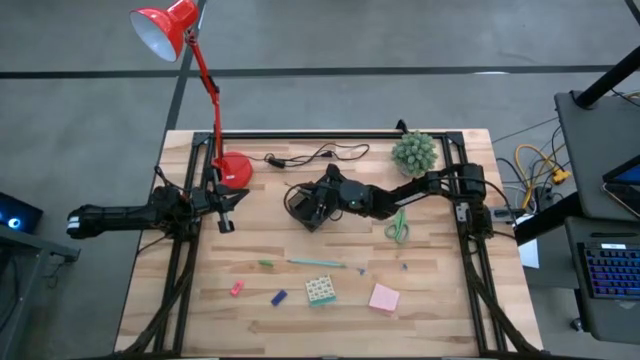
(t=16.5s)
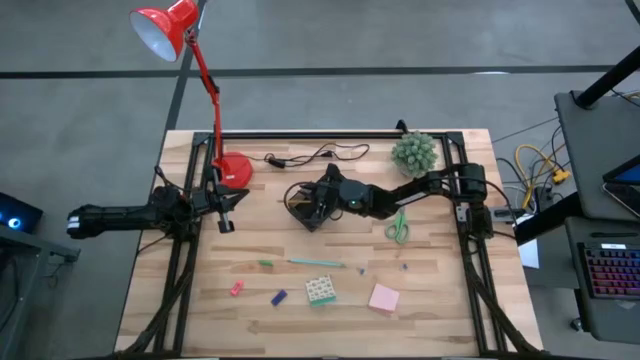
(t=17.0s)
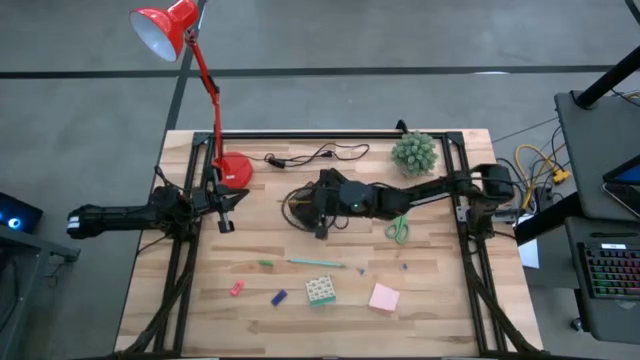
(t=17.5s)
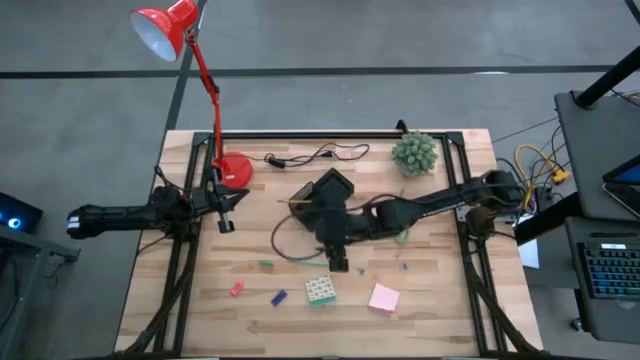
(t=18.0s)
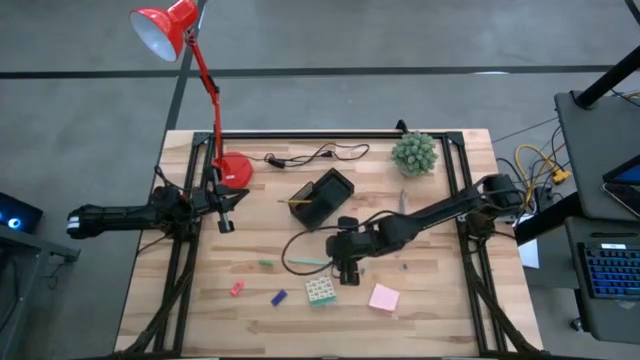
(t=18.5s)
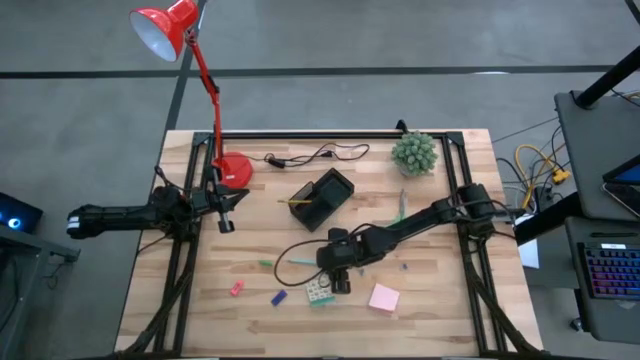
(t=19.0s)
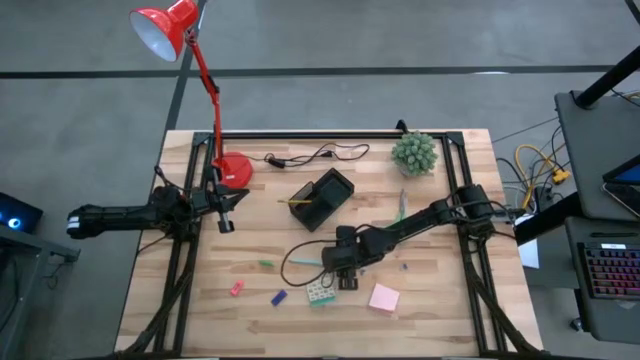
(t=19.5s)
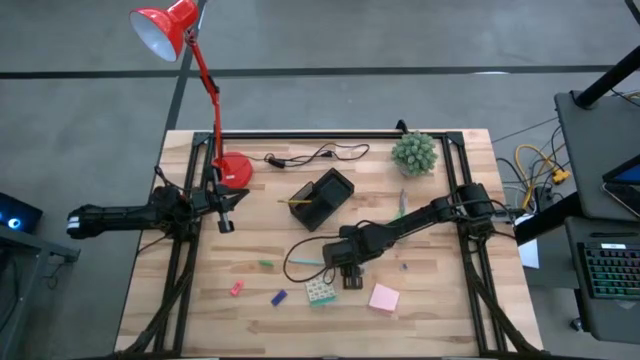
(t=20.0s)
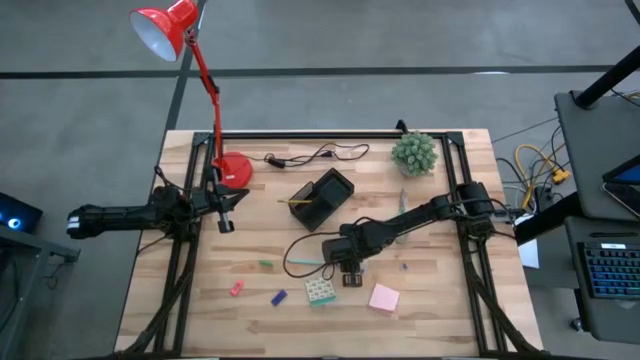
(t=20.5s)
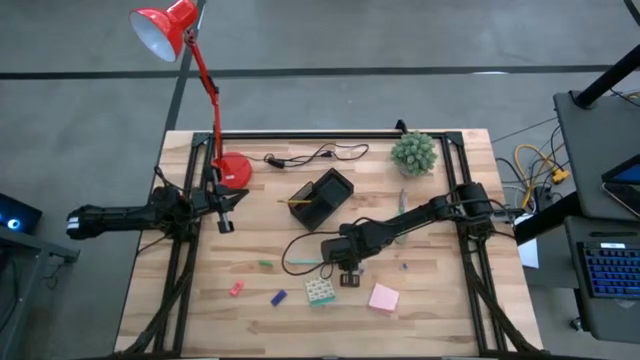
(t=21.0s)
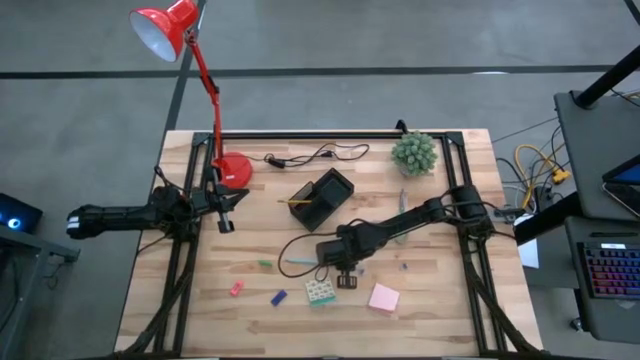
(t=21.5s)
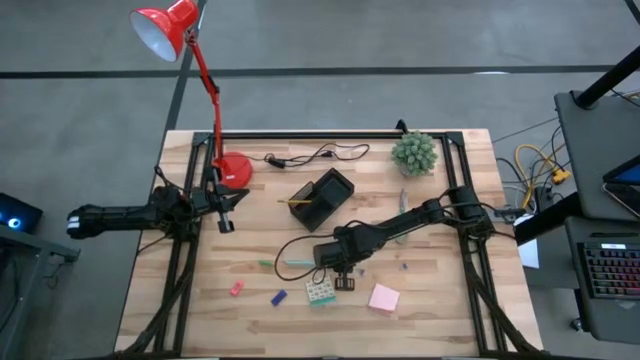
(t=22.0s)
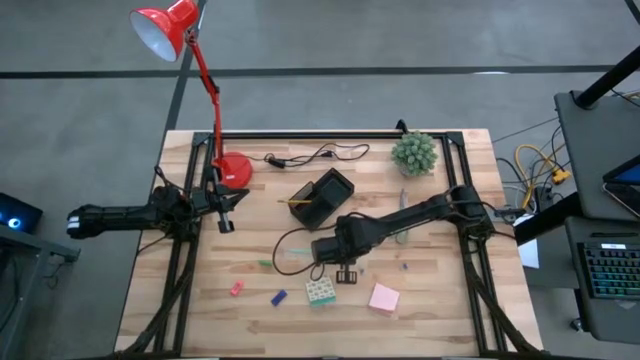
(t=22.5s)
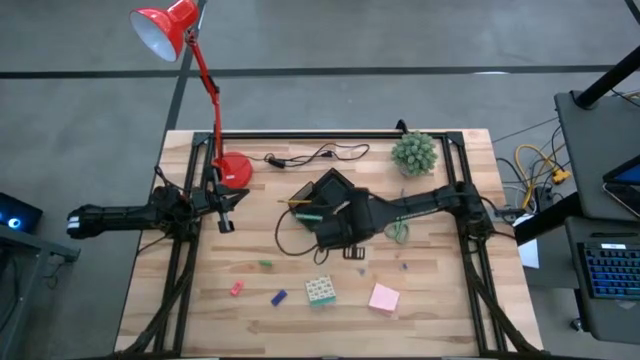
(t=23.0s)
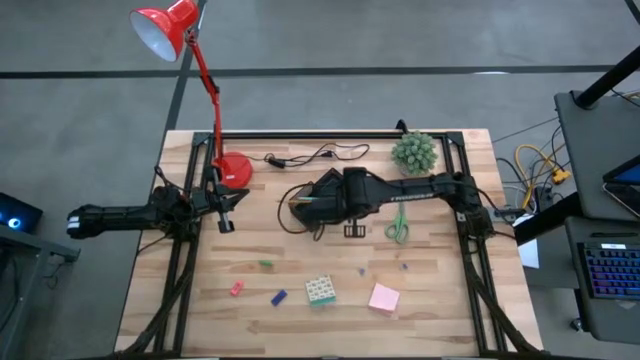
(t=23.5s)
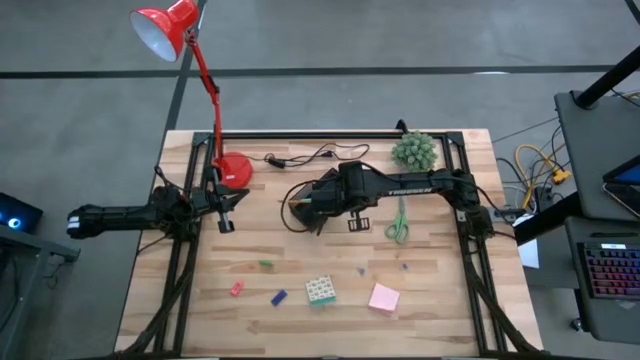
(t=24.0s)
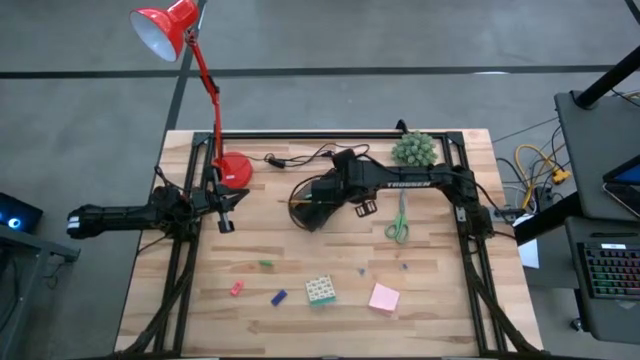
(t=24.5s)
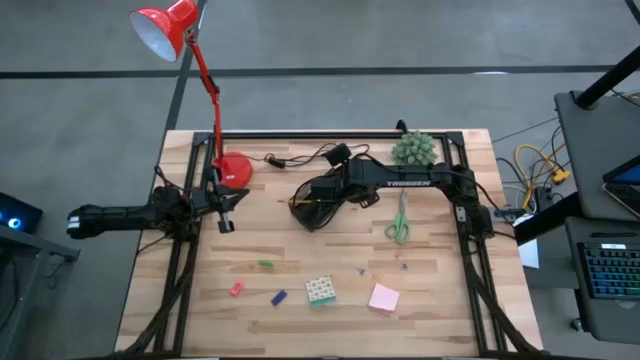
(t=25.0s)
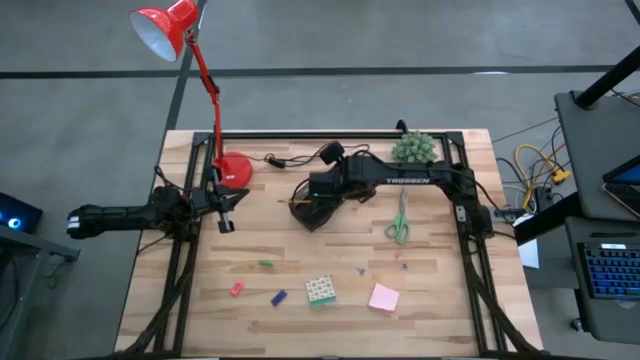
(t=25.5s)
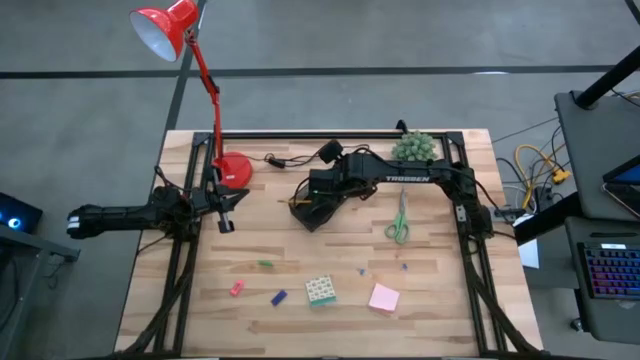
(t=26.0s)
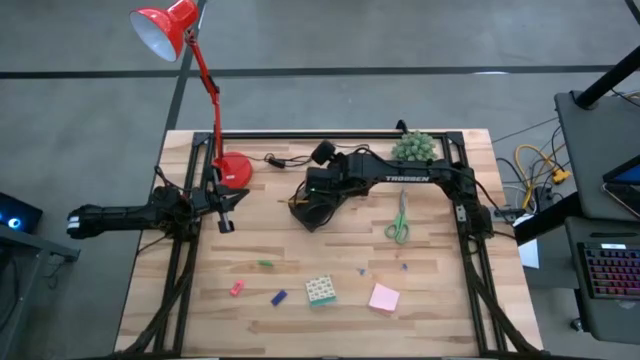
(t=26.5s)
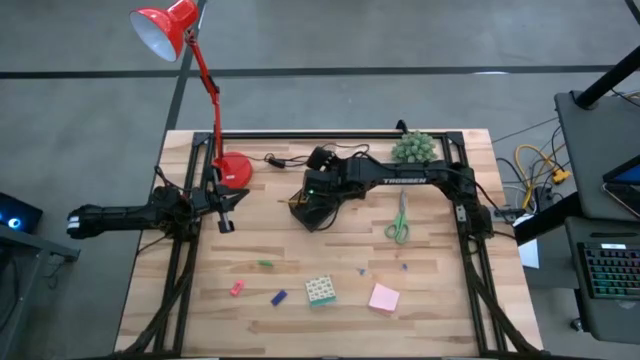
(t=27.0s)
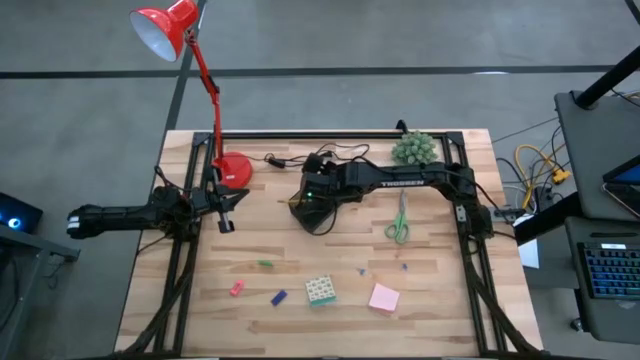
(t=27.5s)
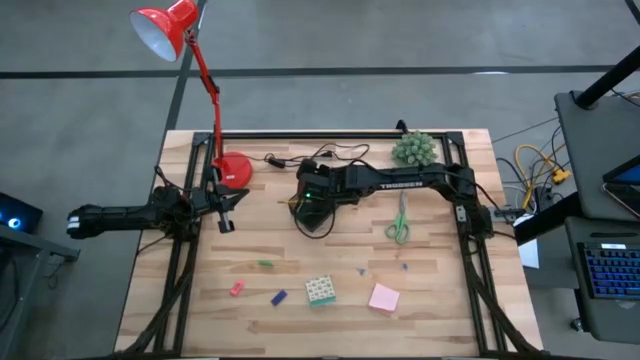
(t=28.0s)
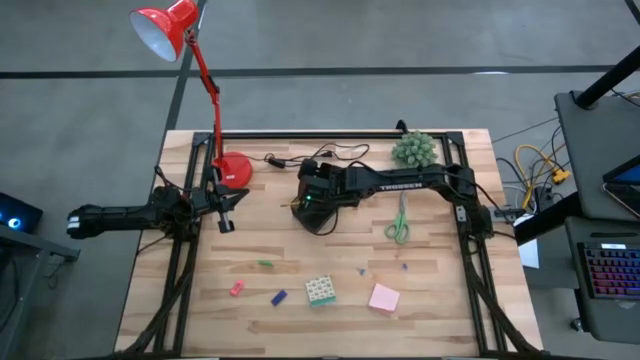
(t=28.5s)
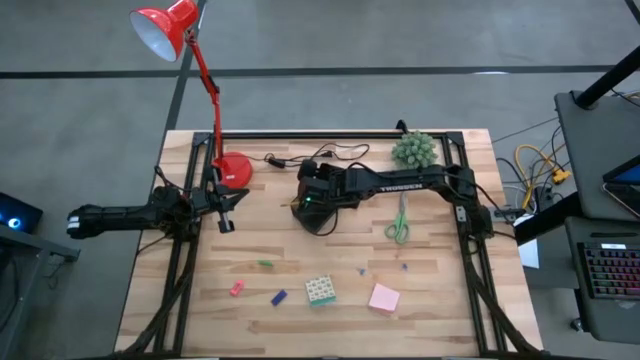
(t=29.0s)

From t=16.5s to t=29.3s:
Task: Pick and place office supplies into organizer
Put the blue pencil into the black desk organizer

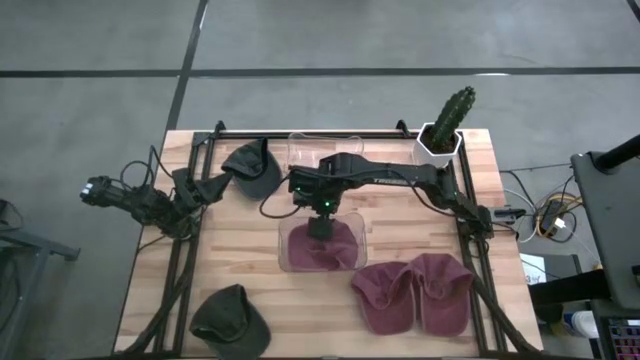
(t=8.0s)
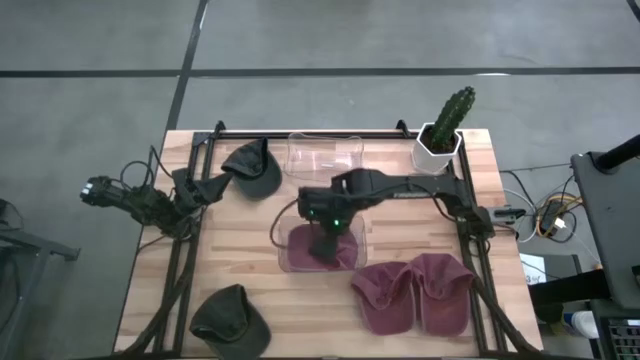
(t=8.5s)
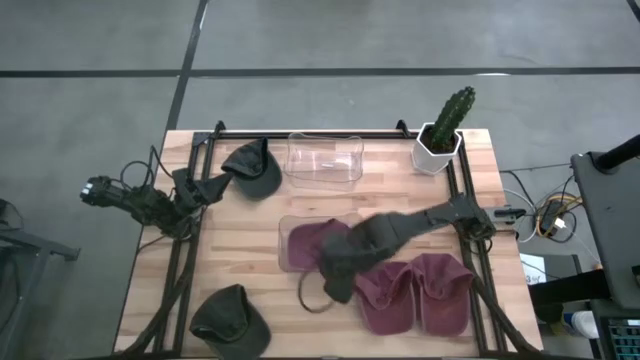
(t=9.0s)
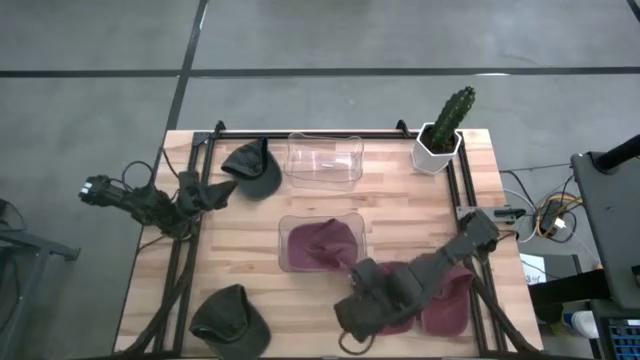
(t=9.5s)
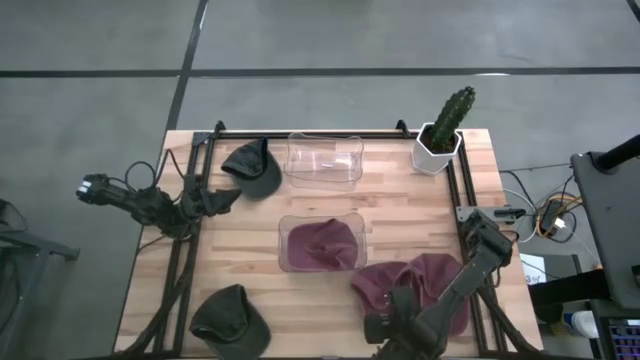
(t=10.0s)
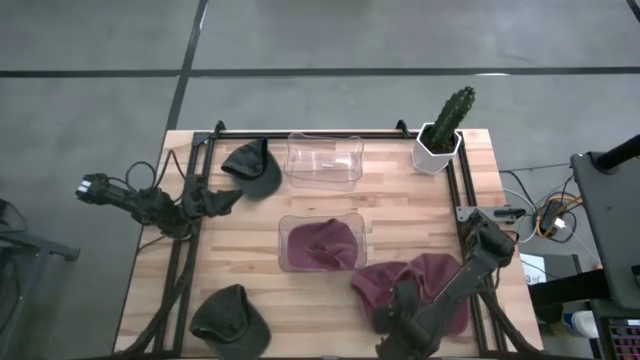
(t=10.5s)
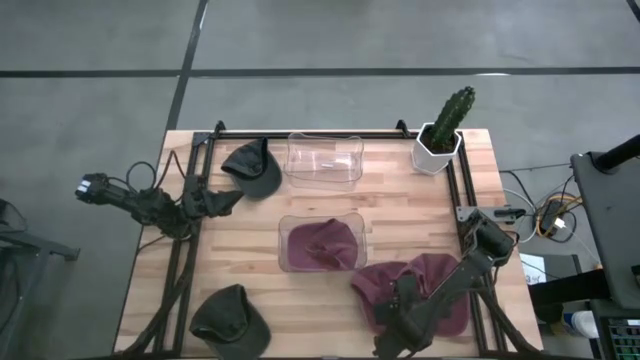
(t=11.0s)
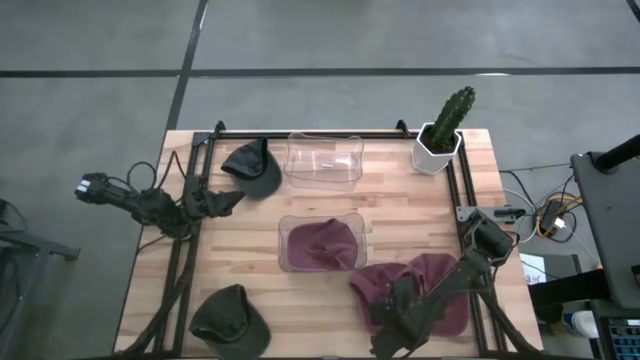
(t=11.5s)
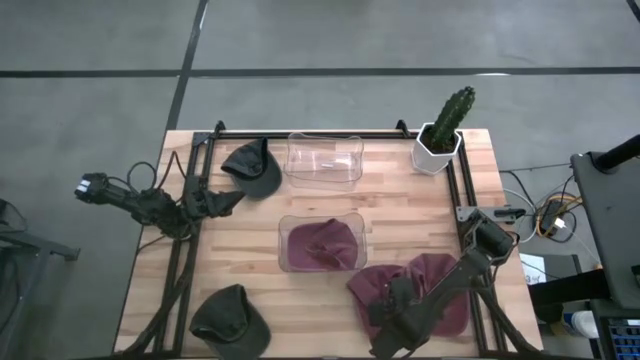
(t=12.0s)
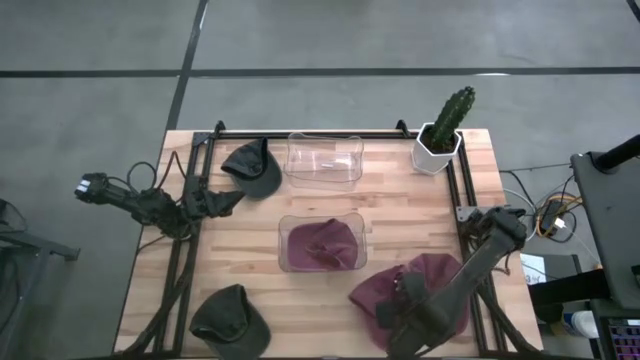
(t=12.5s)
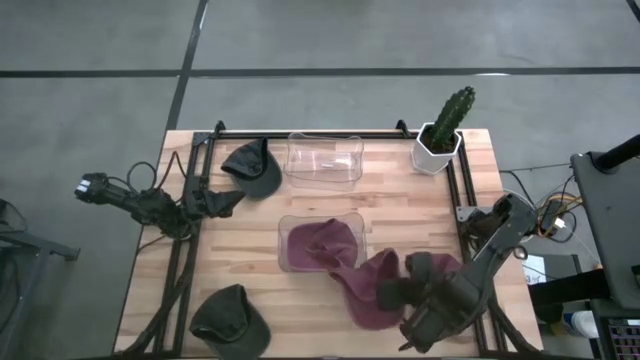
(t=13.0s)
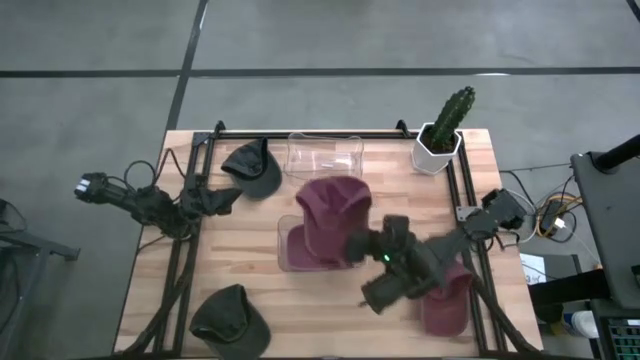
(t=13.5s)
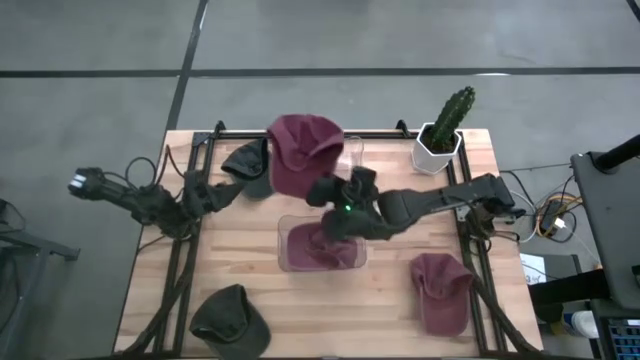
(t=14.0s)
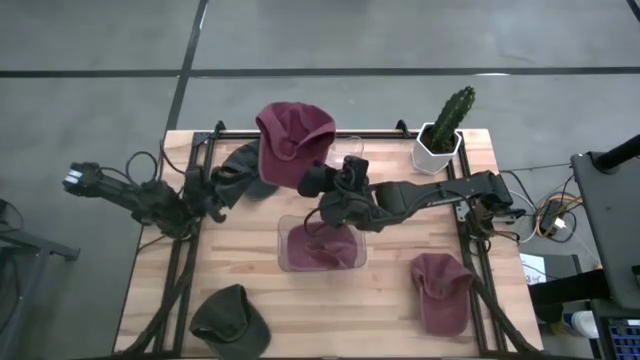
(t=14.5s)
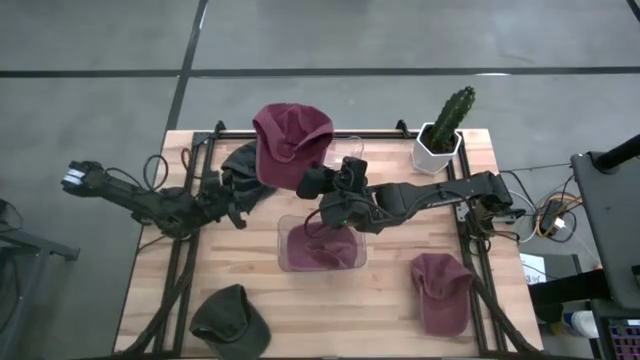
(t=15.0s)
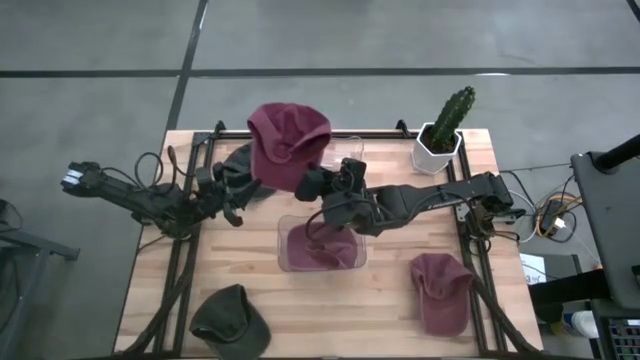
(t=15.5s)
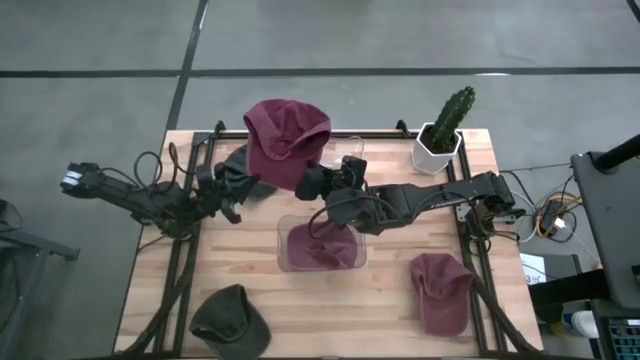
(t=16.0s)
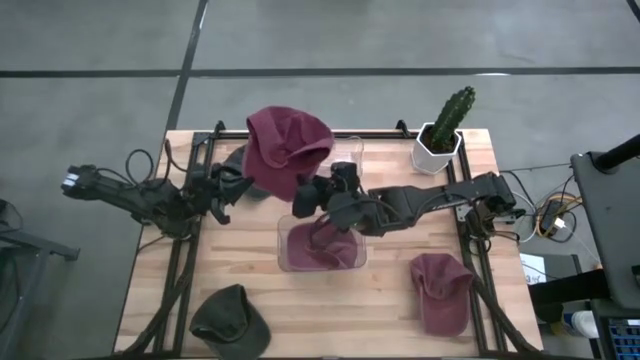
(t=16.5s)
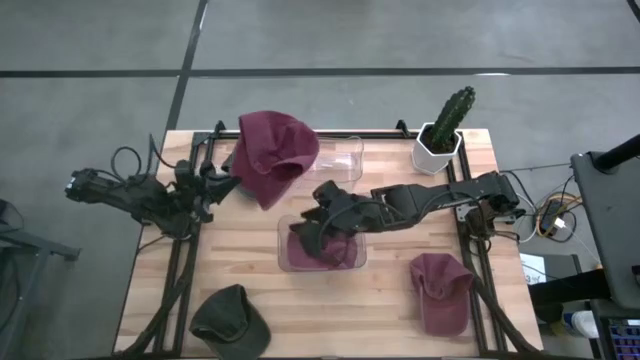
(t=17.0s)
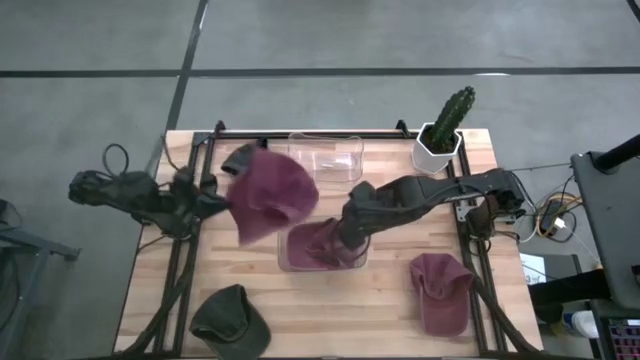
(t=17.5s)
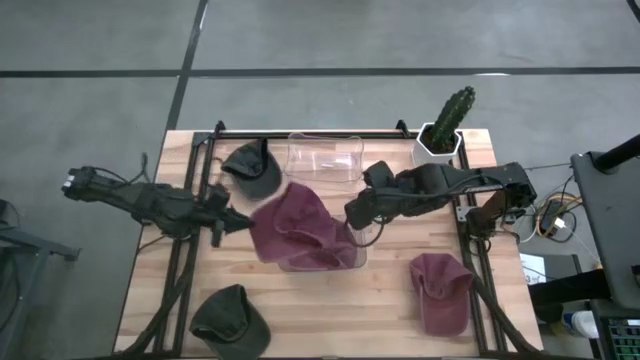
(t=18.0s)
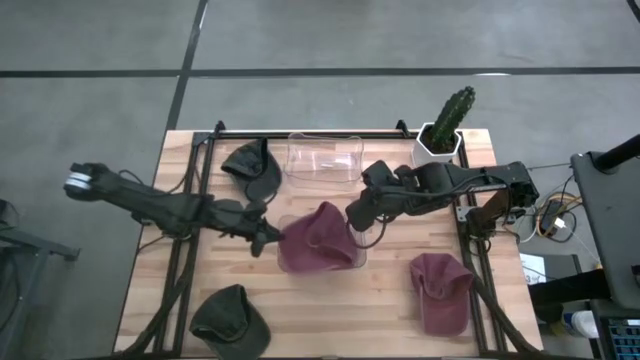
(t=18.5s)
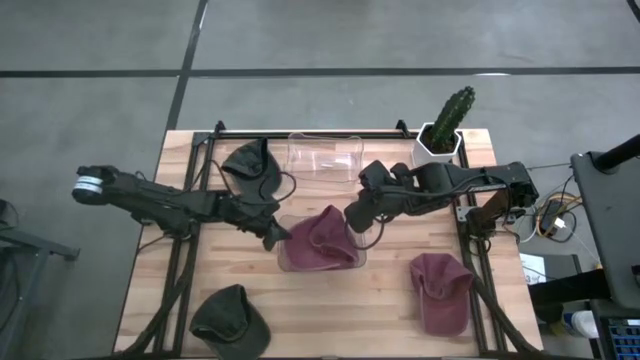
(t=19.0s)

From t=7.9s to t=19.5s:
Task: Pick & Place hat
Put the left red cap into the bottom transparent bin
